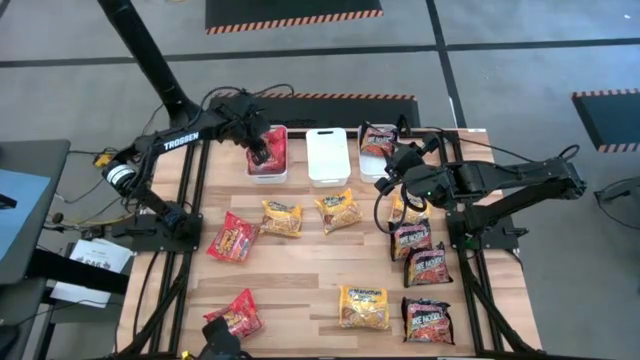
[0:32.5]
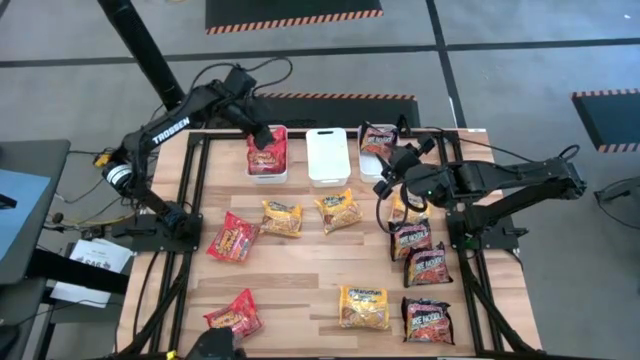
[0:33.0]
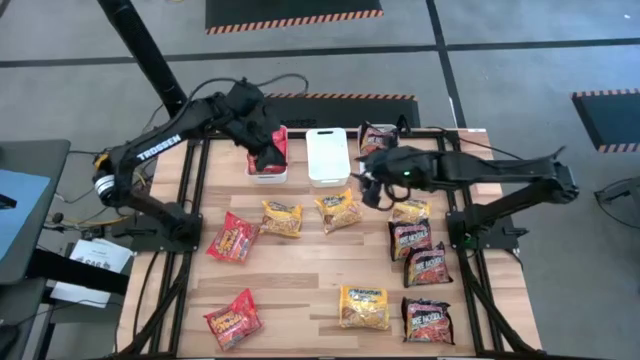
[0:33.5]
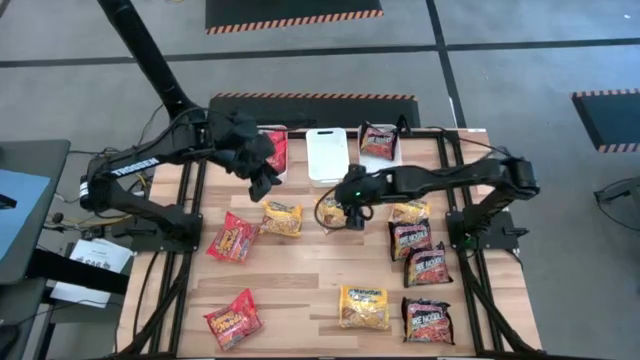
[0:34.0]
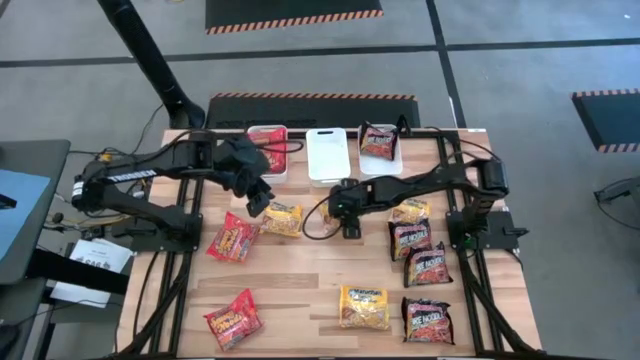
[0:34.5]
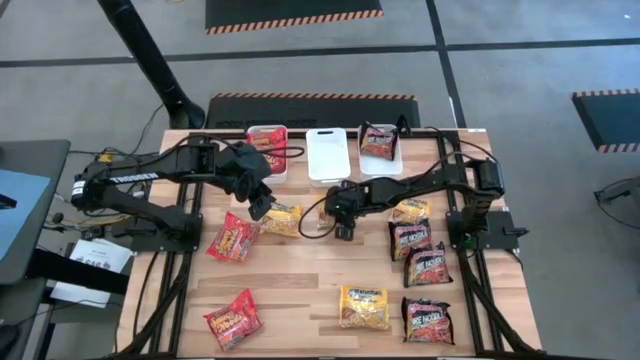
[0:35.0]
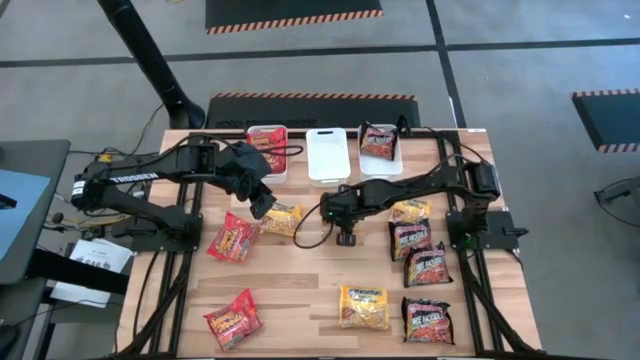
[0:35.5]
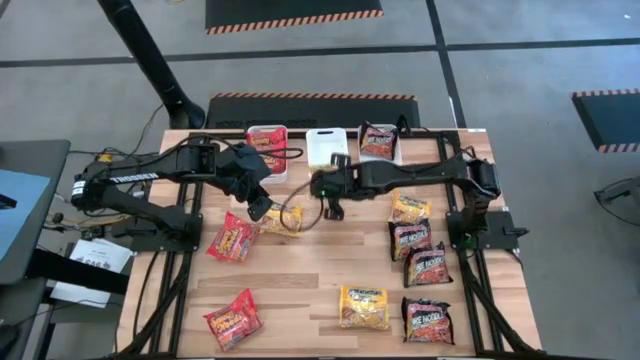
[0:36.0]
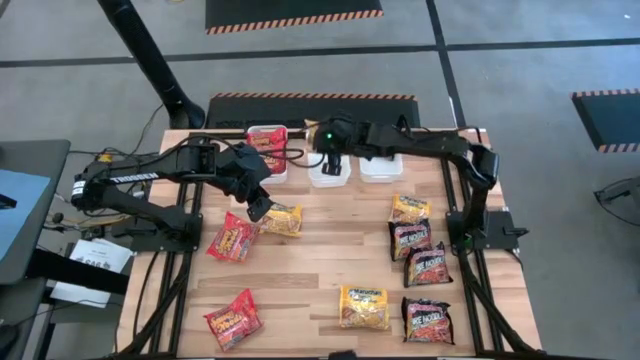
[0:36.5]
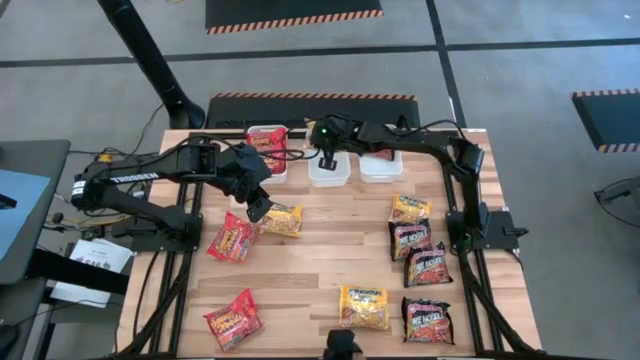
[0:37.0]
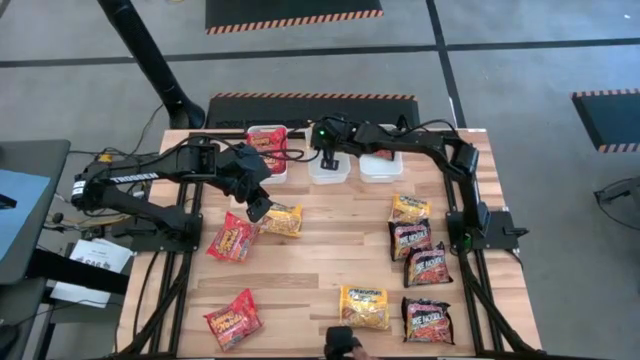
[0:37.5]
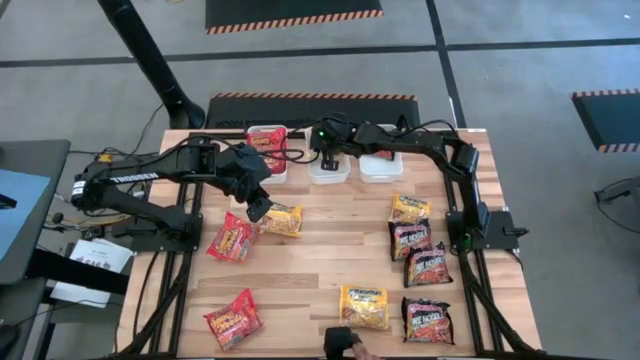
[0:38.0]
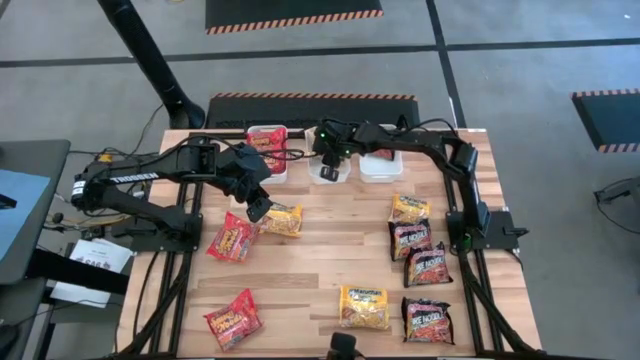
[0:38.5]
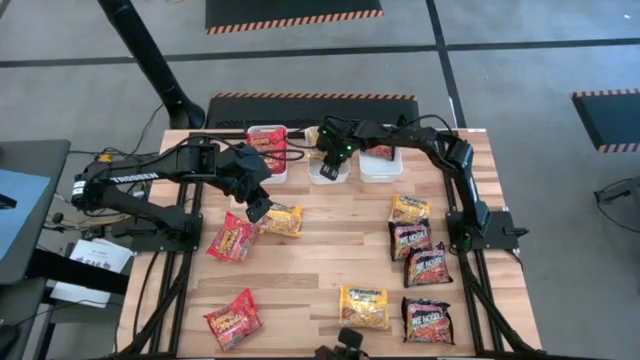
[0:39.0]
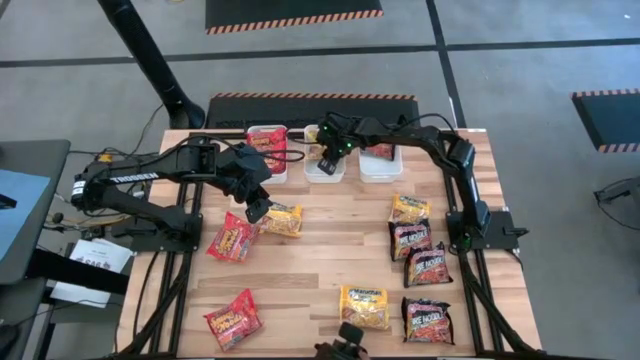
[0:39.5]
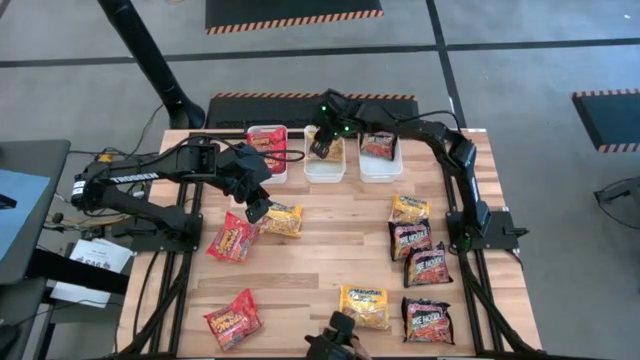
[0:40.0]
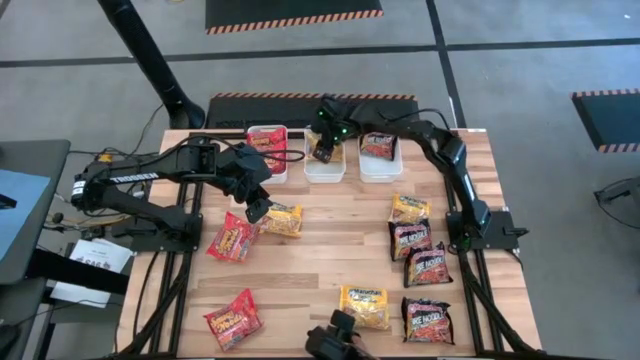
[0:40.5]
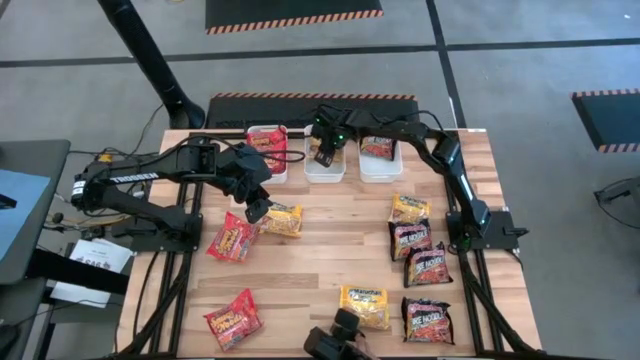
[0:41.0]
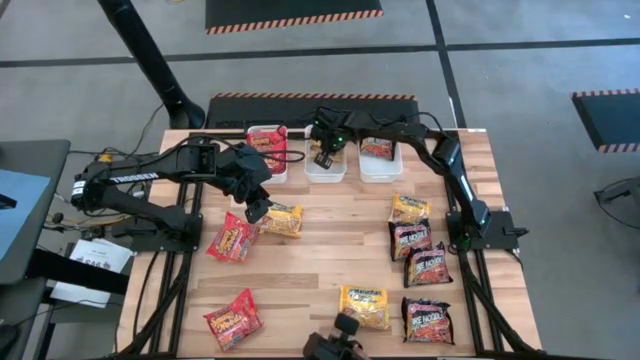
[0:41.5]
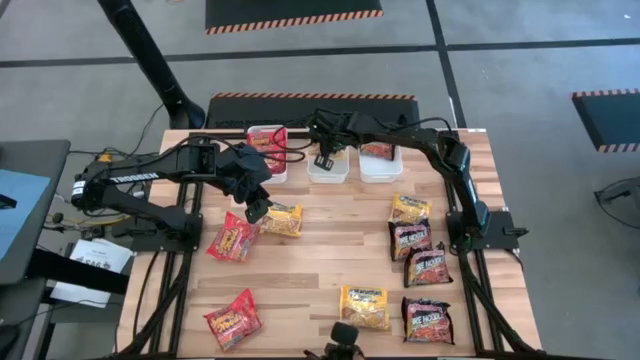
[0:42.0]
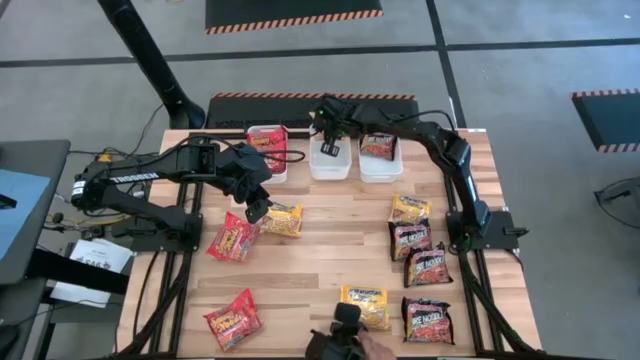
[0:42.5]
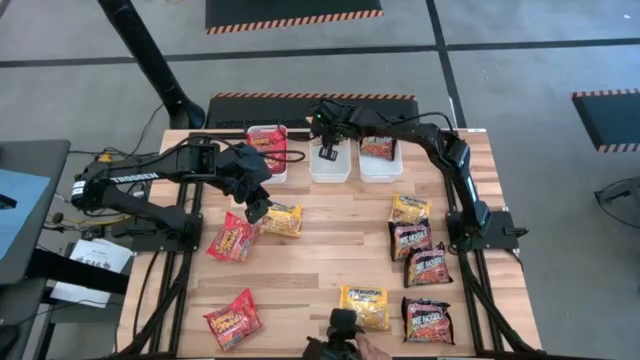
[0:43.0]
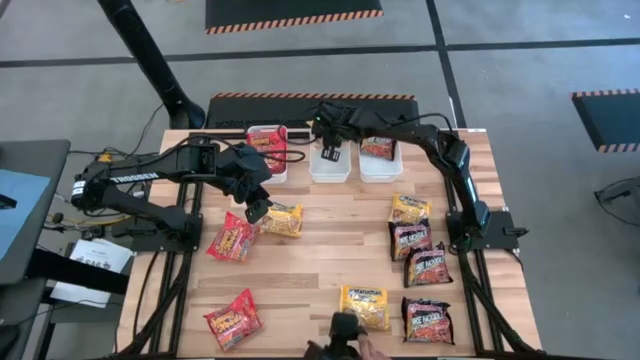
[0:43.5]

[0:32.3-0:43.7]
Task: Sort Maruchan noodles
Put the yellow noodle pack into the middle white bin

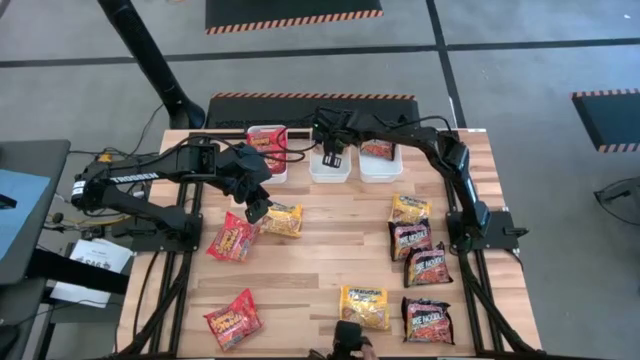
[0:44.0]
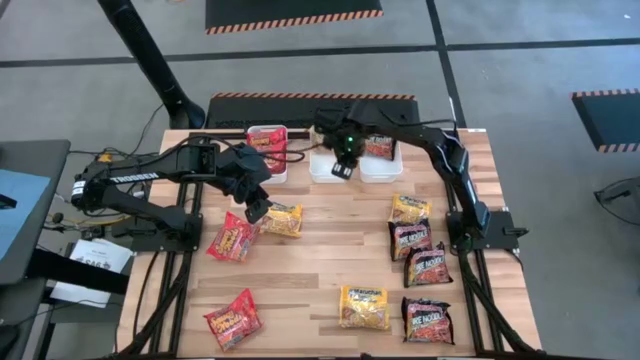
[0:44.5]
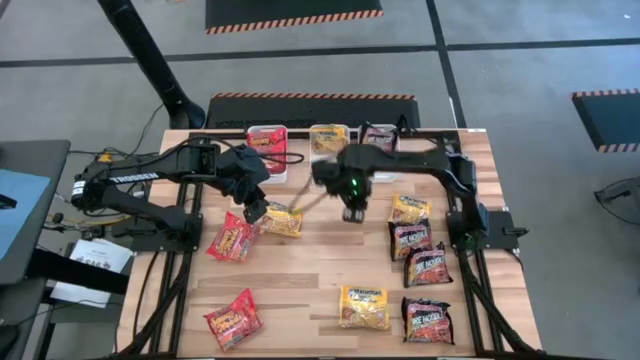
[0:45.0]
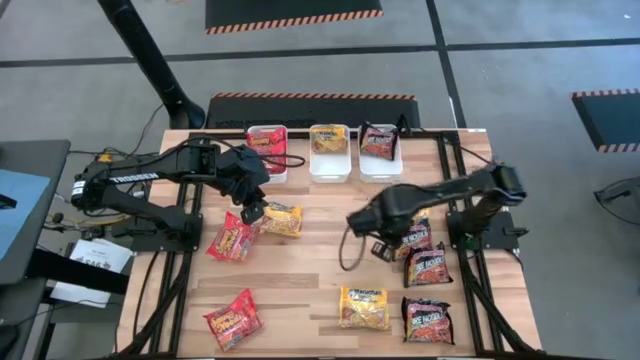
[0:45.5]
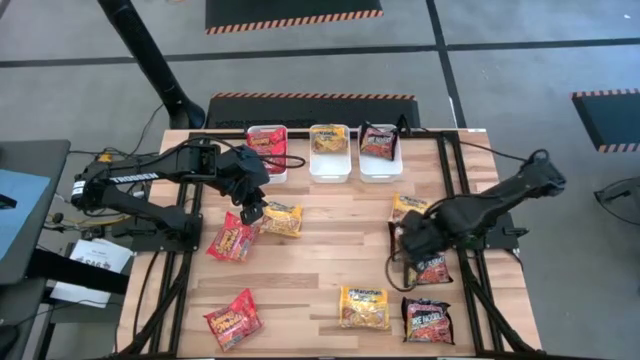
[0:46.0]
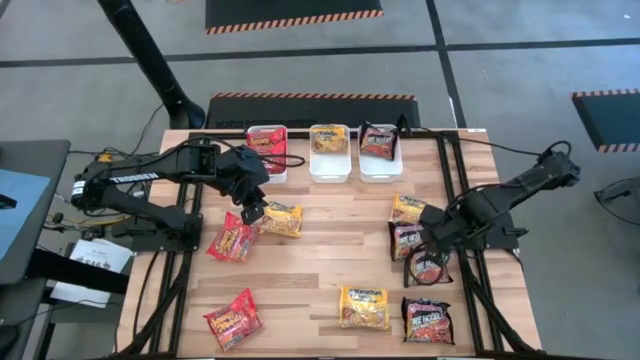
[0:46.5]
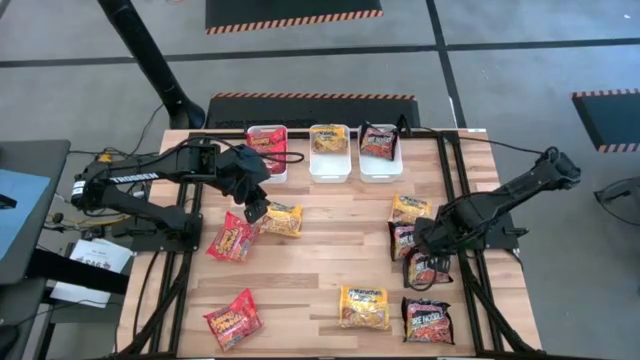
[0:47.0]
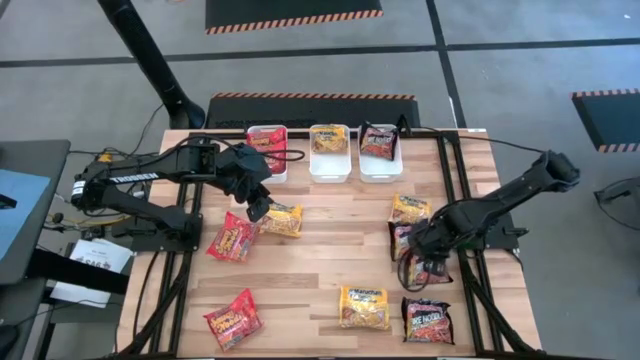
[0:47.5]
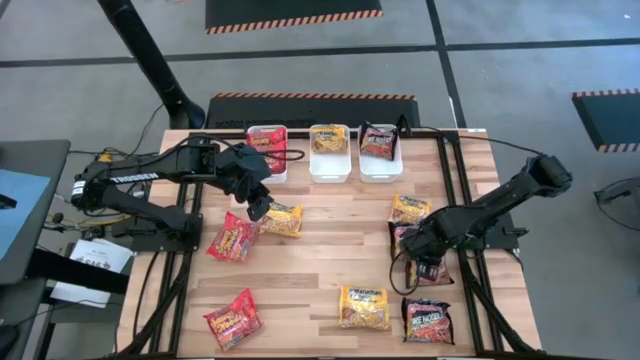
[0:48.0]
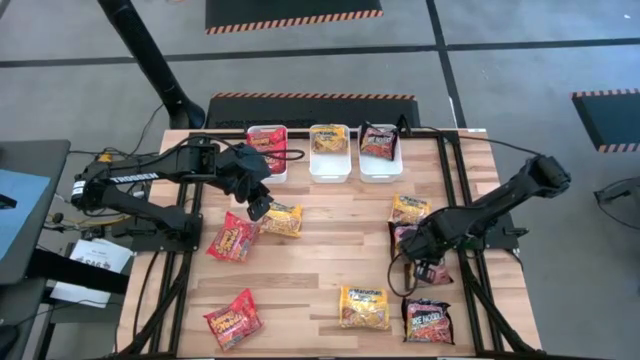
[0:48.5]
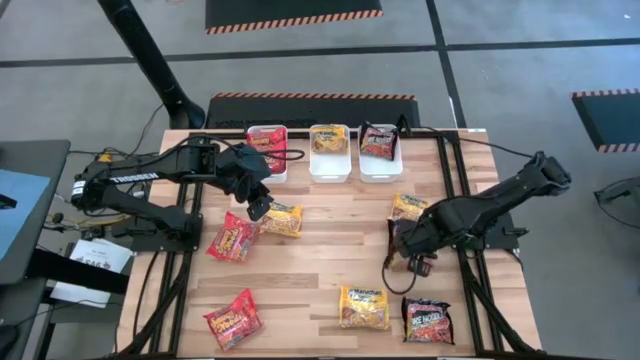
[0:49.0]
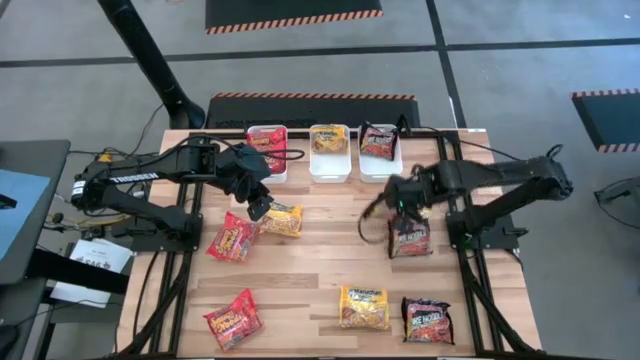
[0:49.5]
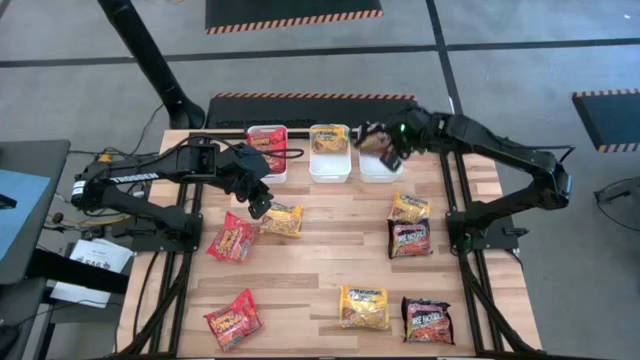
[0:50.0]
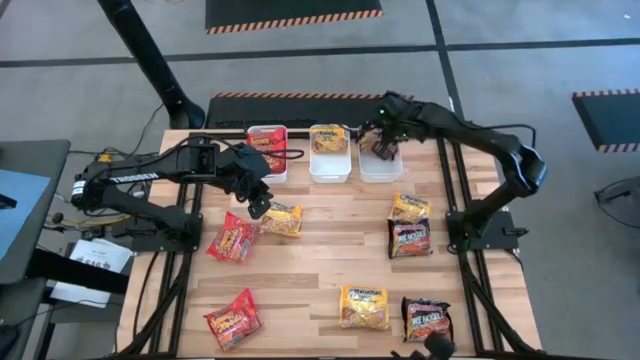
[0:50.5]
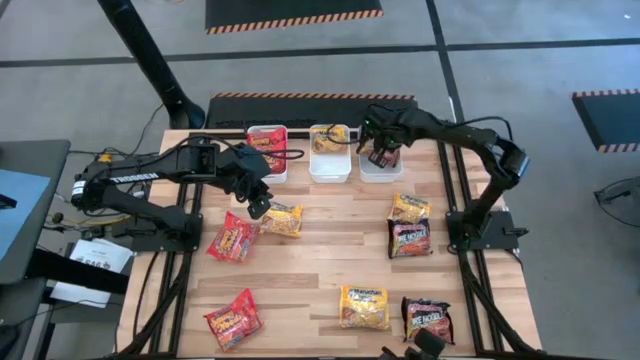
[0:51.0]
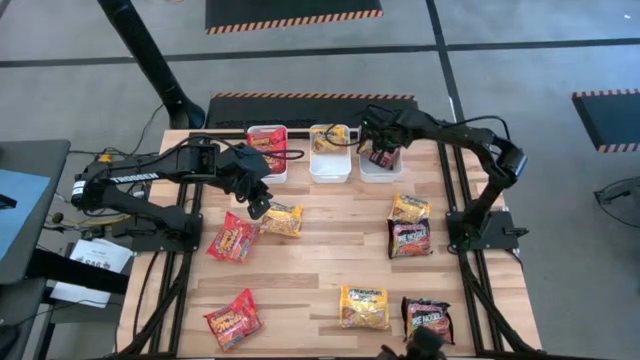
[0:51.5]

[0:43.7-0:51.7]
Put the black noodle pack into the right white bin

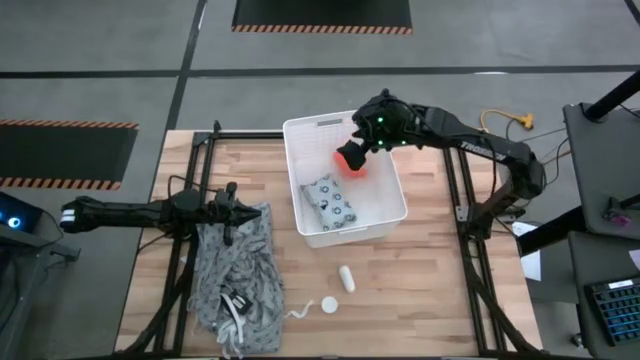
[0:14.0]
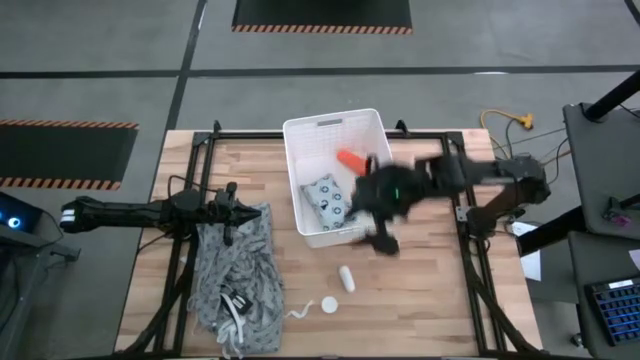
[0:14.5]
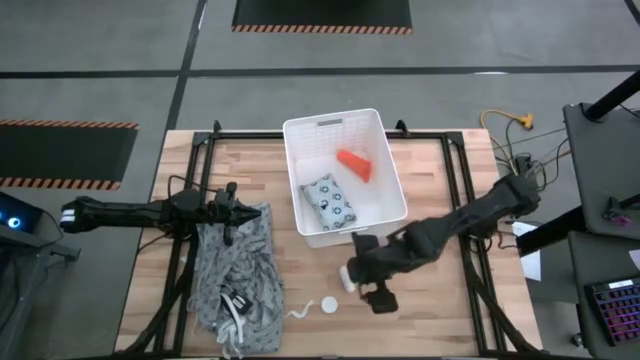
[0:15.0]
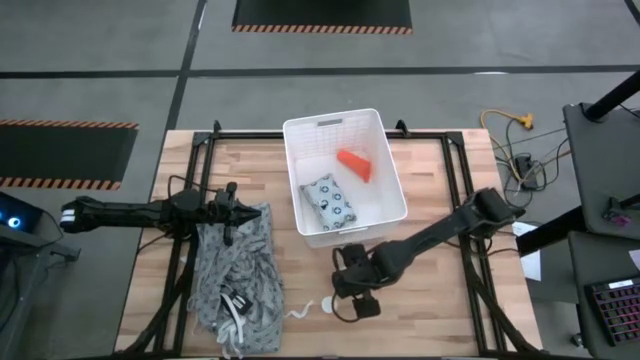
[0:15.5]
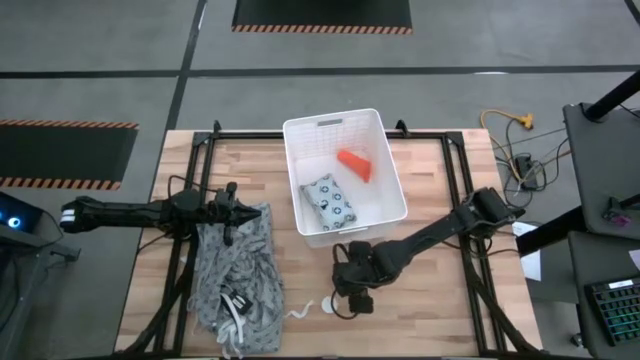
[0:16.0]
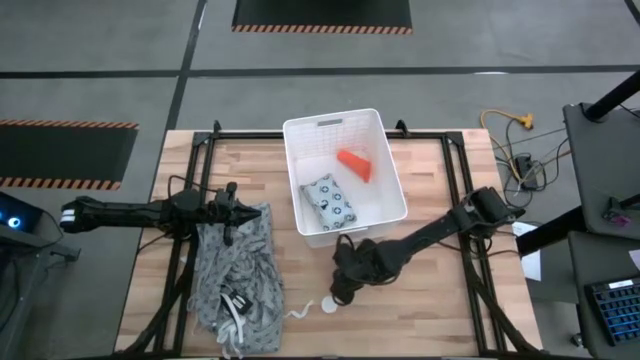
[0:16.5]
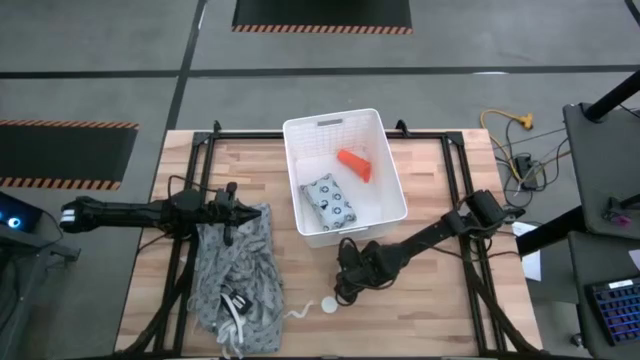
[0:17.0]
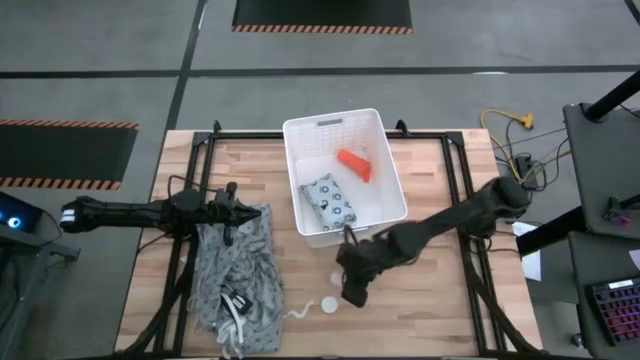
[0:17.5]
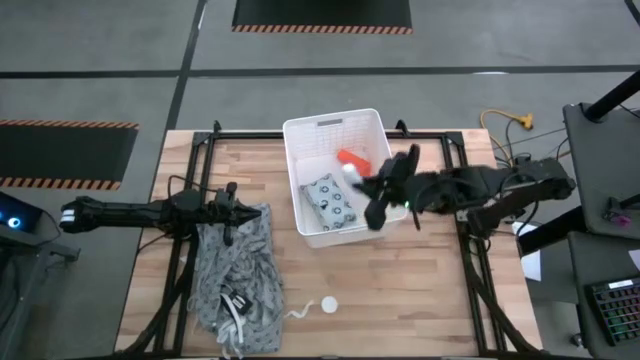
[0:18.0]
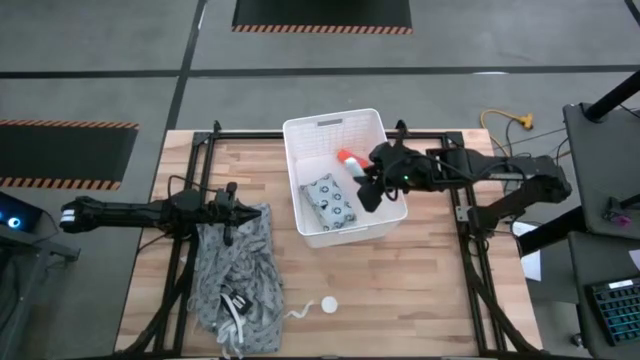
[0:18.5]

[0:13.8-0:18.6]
Task: Pick & place medical supplies in basket/bin
Put the rolled gauze into the white bin
